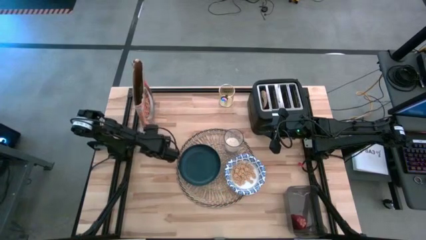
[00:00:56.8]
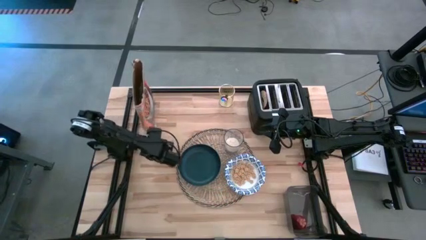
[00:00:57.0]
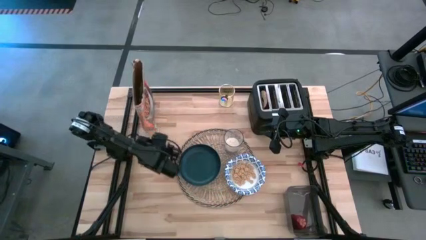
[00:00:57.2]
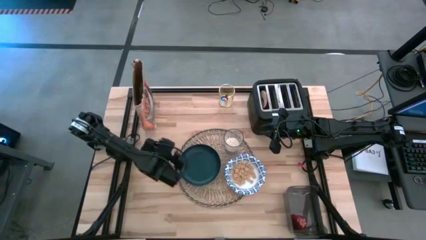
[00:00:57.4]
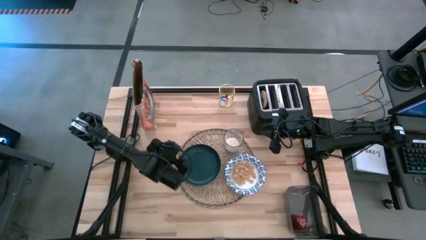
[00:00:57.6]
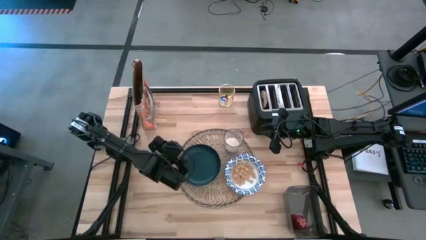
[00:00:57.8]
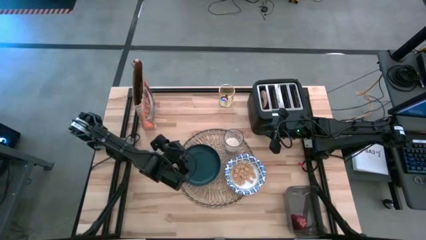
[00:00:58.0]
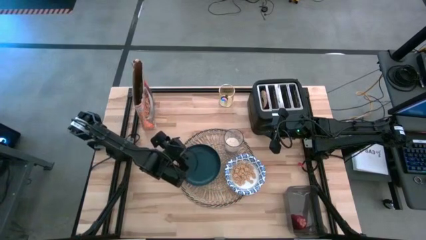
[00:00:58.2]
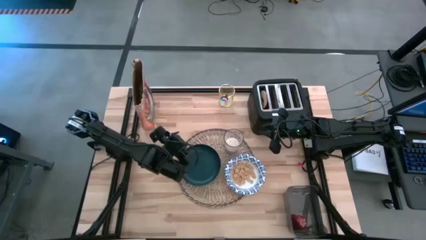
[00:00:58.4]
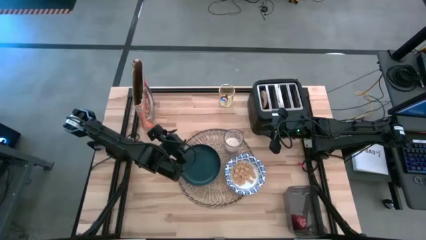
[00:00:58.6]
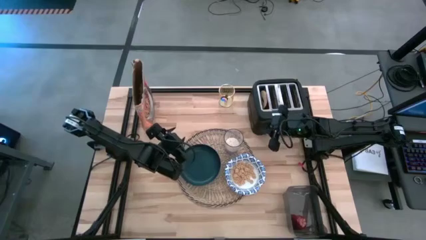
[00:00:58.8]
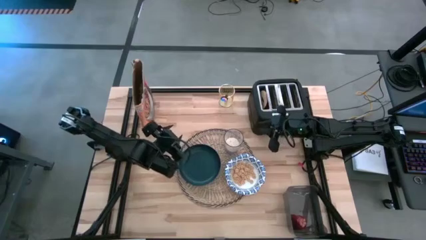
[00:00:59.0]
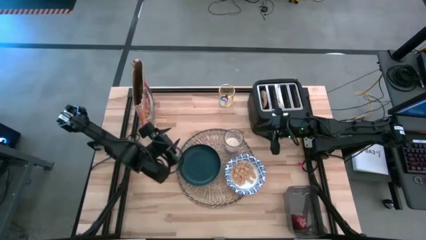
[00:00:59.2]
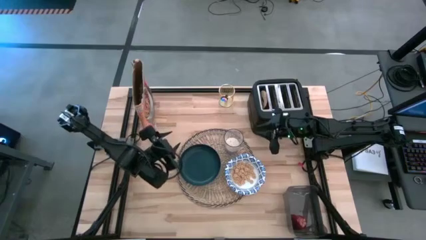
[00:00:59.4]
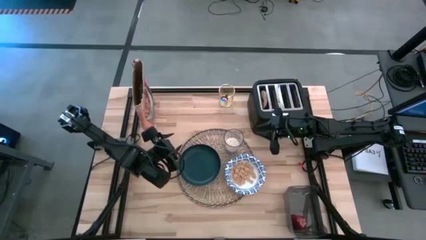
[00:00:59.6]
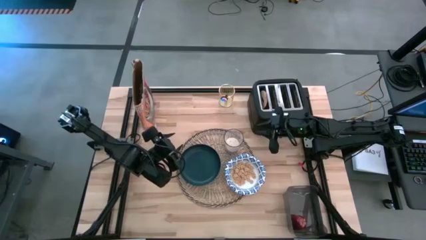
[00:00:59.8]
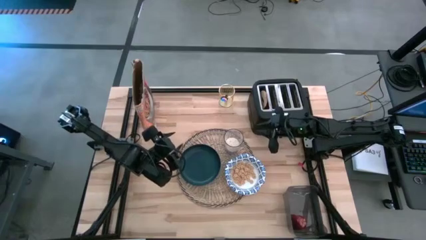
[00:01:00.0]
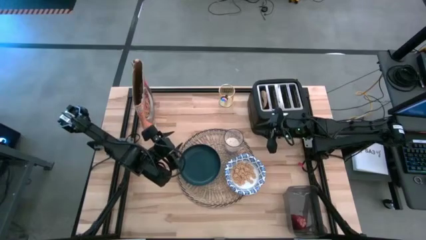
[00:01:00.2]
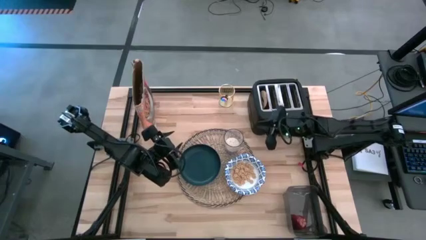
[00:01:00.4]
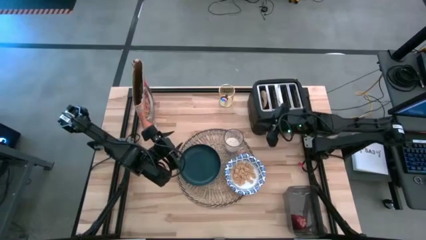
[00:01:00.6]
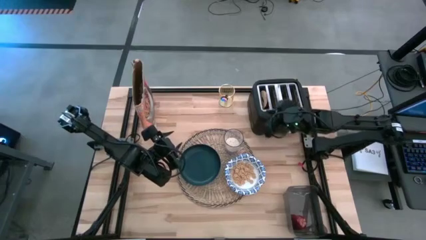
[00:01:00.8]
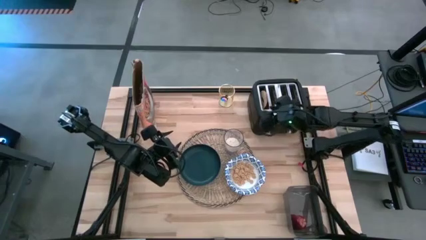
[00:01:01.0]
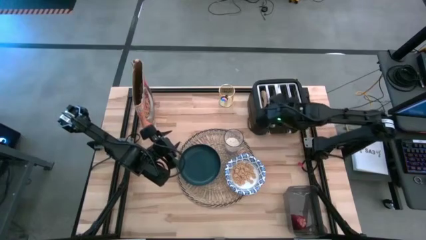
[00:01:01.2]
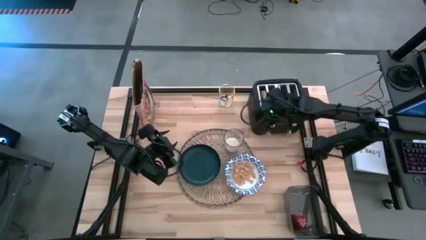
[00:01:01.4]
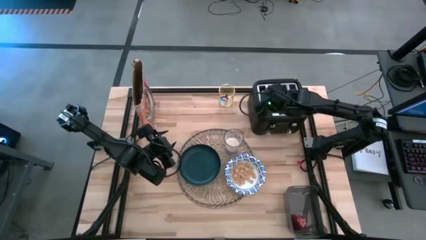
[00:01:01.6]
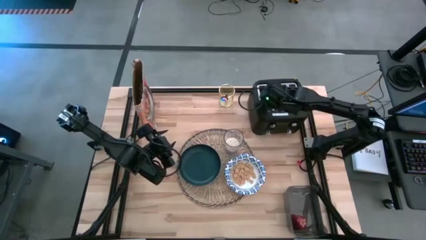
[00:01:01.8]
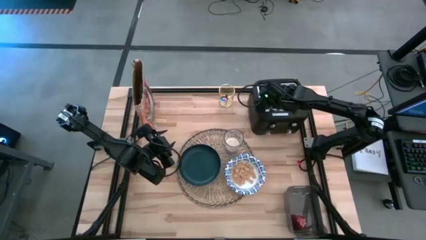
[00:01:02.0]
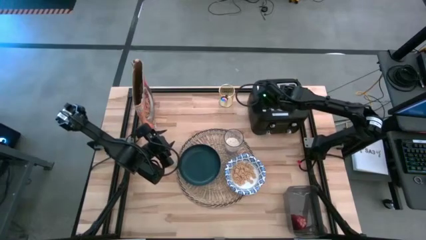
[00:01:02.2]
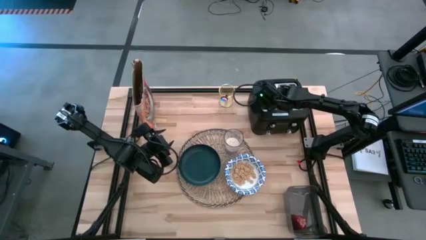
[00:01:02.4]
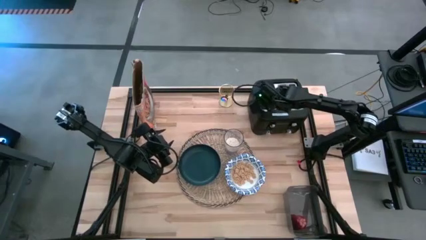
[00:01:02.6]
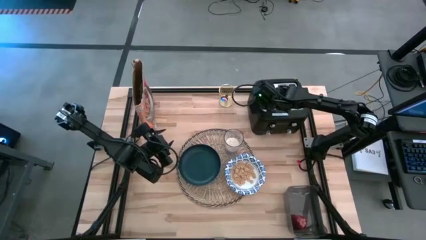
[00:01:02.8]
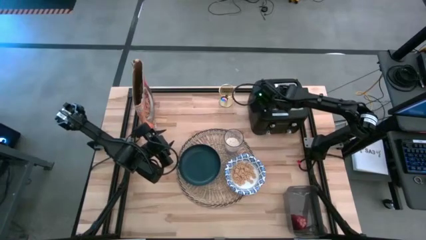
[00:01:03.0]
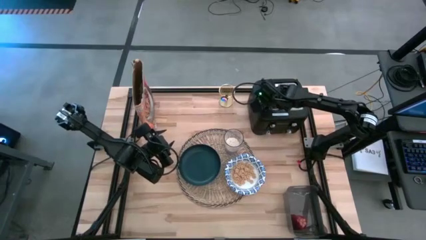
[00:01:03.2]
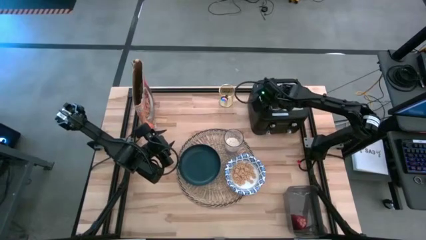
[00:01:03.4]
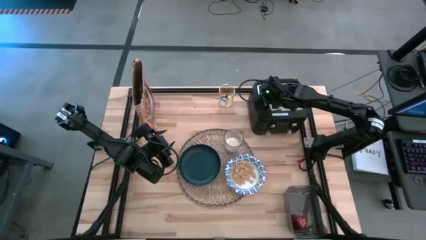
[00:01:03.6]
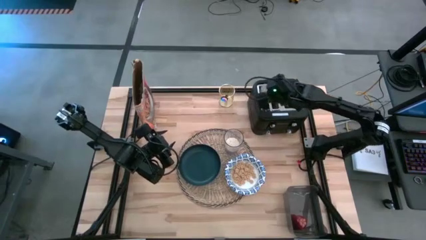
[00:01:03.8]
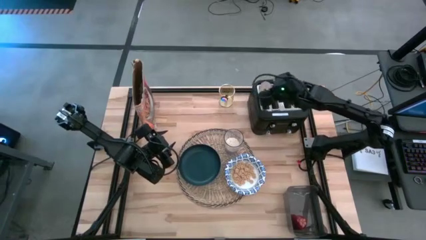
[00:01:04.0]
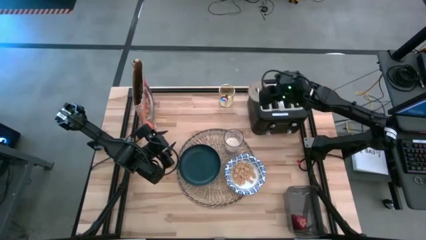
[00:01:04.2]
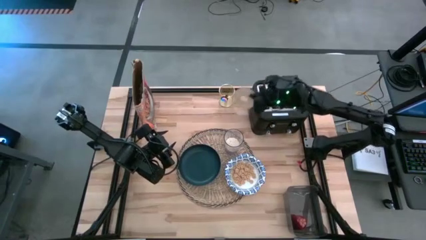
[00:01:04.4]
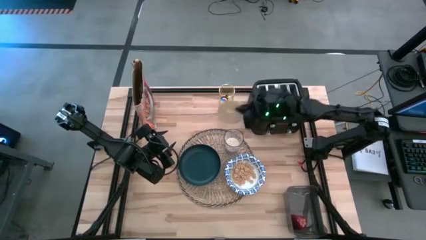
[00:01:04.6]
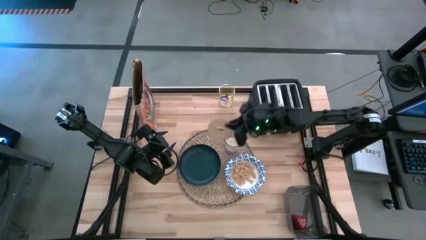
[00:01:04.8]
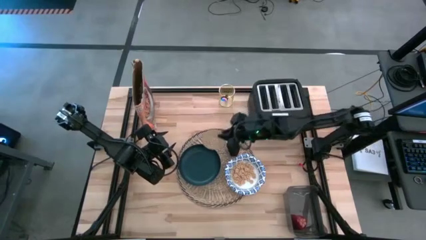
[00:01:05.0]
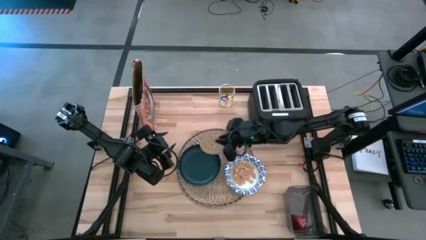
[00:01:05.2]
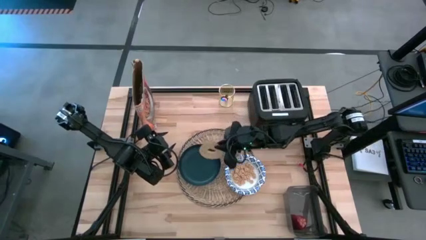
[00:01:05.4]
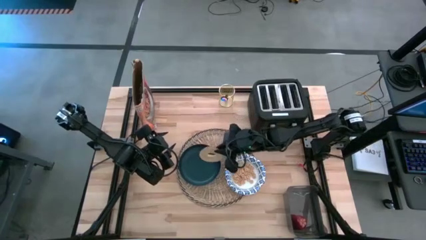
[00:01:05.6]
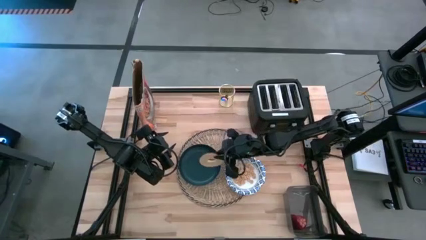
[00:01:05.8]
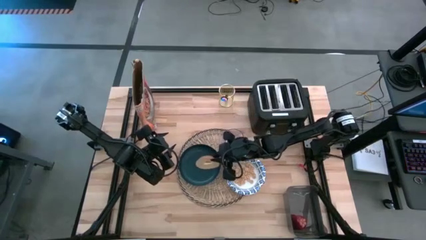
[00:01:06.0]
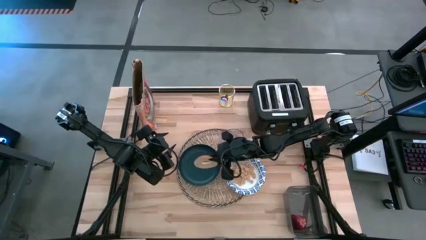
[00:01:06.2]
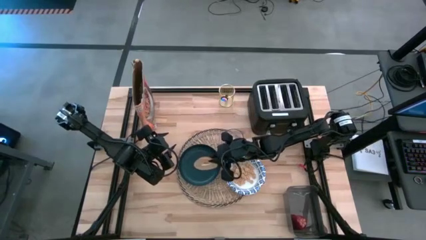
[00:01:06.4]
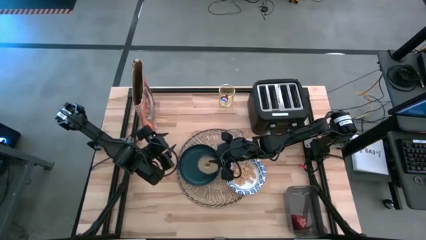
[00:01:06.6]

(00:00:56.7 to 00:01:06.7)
Task: Arrange a breakfast setting
Put the bagel on the blue plate
